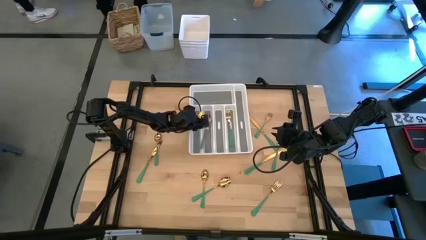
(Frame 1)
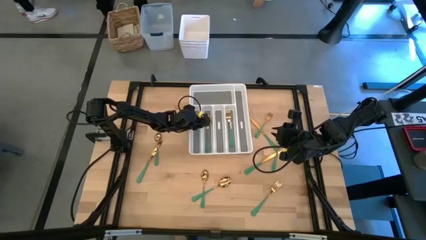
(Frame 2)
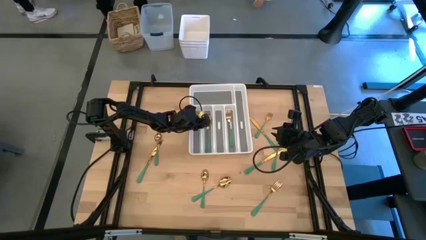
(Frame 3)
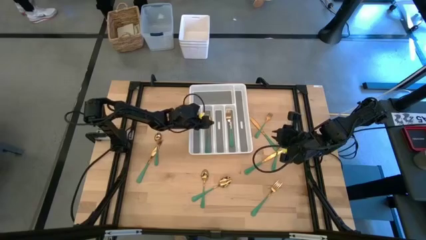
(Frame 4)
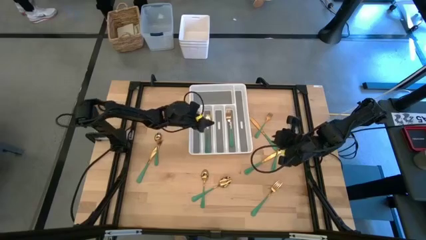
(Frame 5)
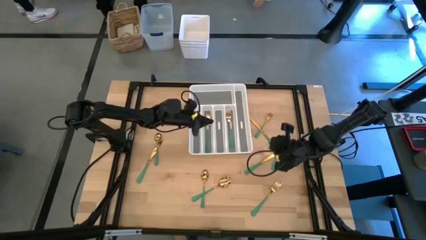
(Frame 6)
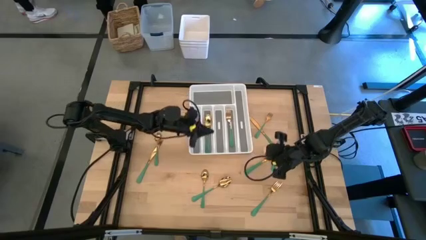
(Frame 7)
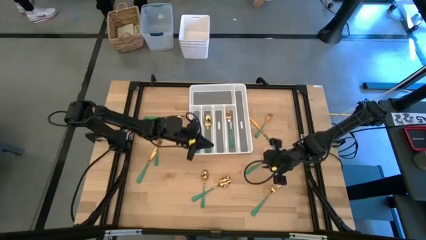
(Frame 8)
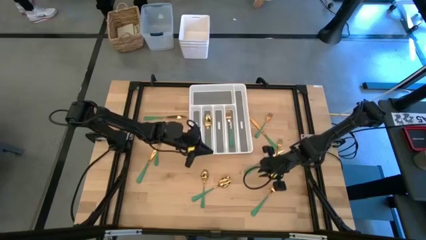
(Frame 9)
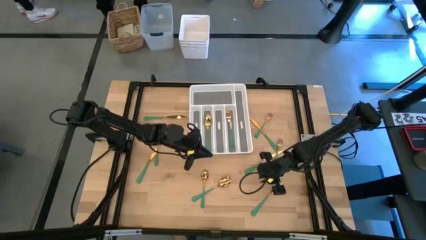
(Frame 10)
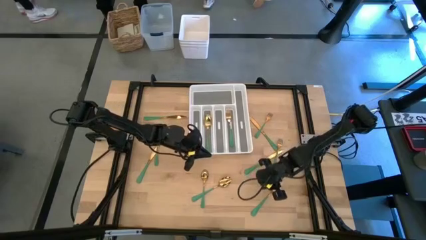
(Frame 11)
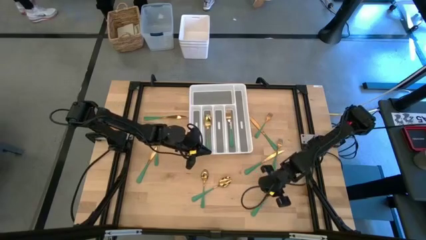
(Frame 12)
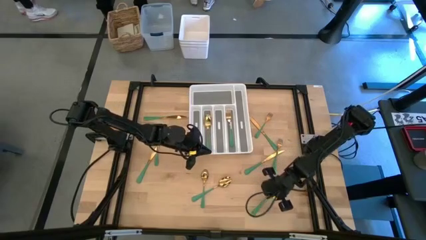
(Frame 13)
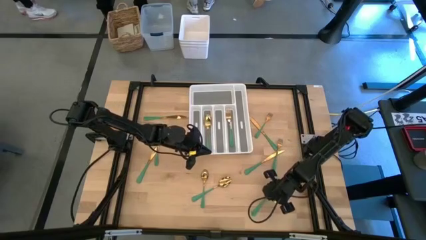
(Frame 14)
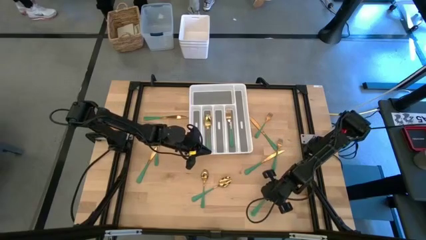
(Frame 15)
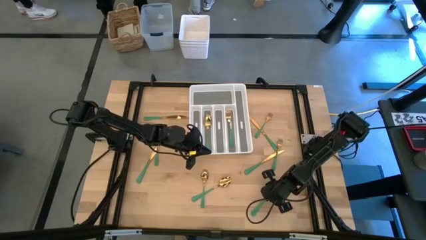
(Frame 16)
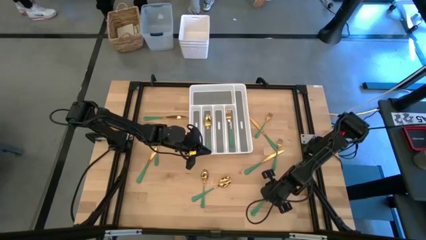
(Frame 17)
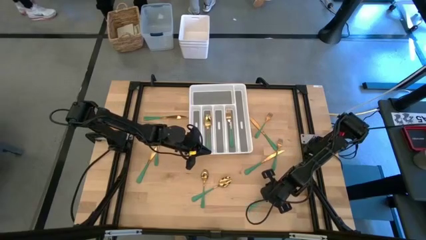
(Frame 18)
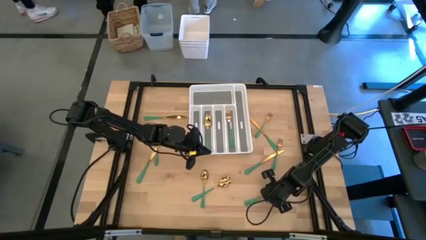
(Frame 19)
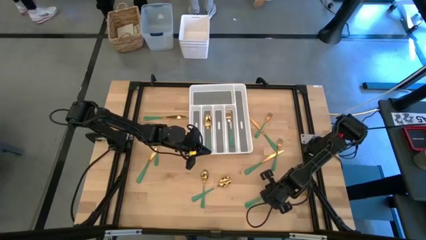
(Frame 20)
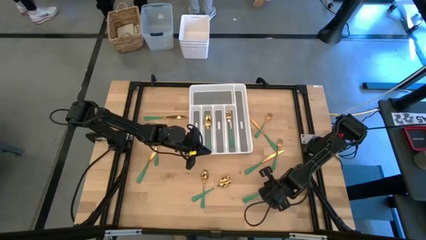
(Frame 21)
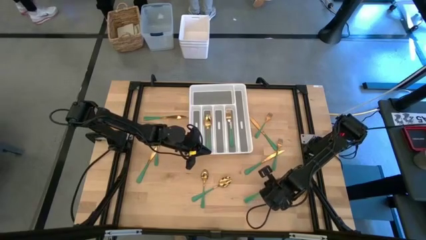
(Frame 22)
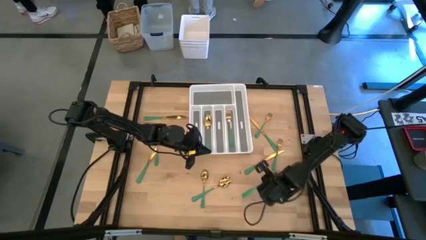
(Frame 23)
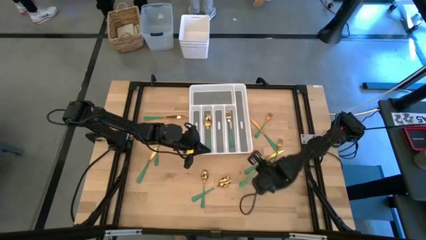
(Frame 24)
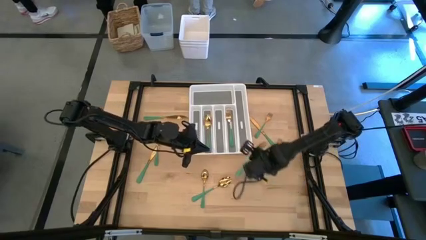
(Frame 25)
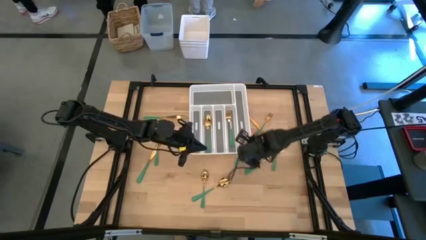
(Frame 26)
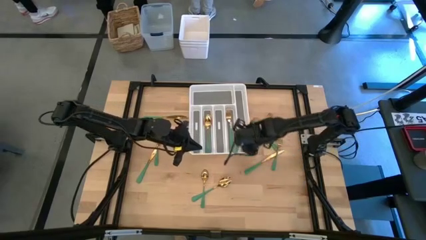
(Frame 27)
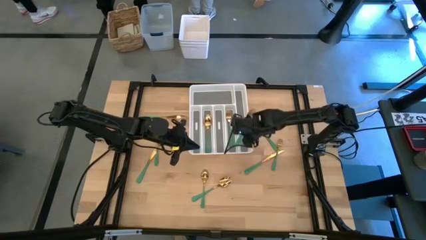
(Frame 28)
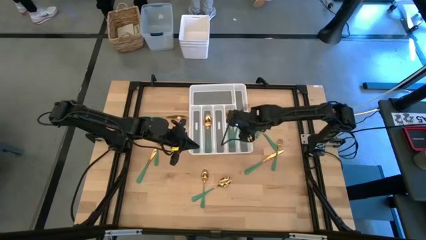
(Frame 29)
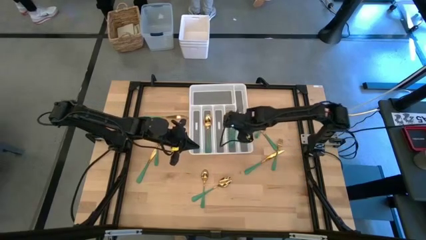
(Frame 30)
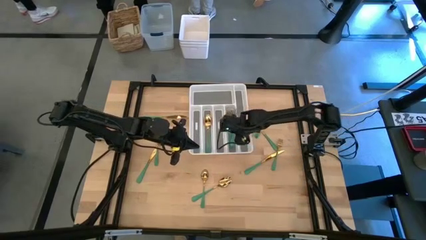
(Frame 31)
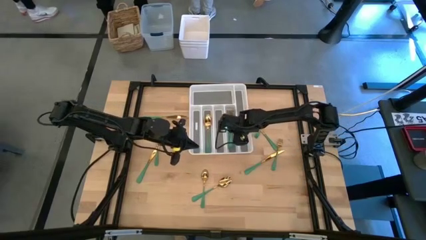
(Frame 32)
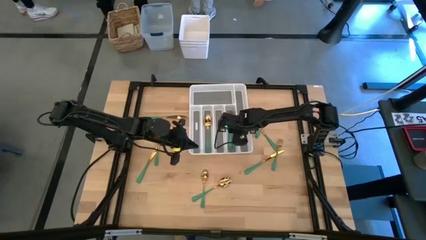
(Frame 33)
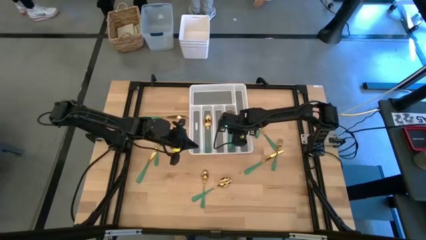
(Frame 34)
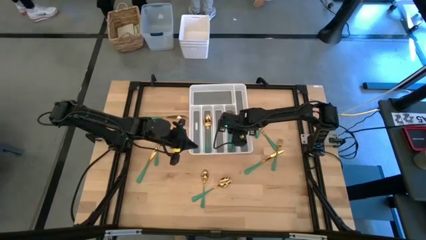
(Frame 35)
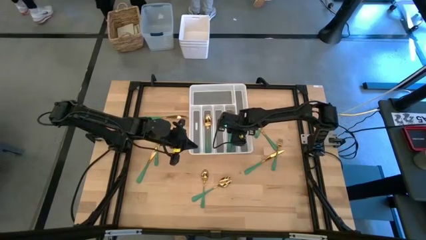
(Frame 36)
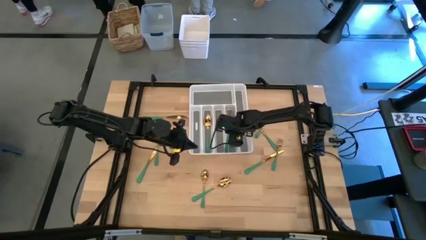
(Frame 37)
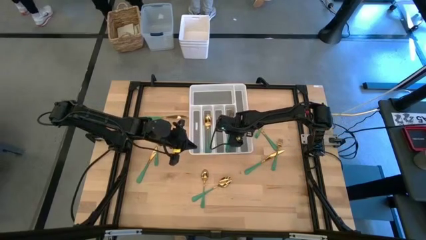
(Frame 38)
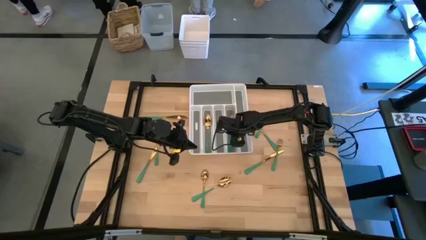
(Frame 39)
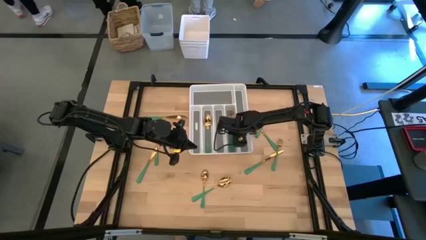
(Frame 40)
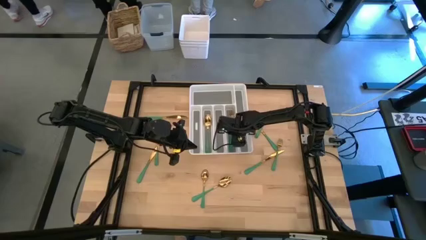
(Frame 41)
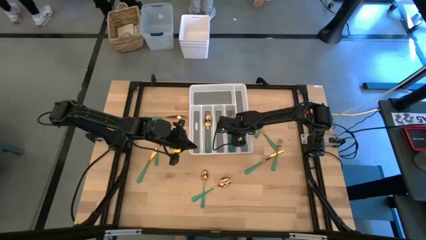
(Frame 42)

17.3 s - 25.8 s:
Task: Sort silverware
Put the bottom right fork into the silverware organizer

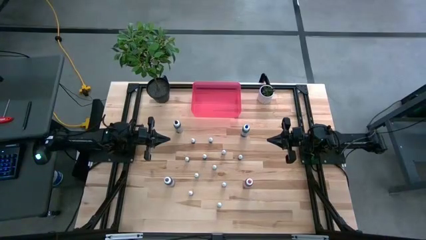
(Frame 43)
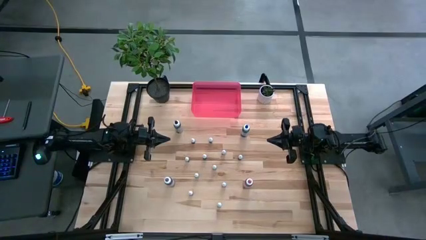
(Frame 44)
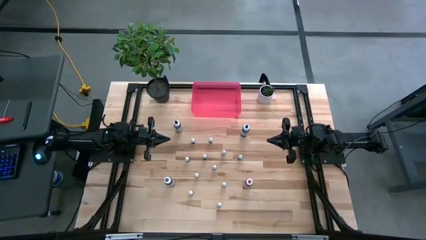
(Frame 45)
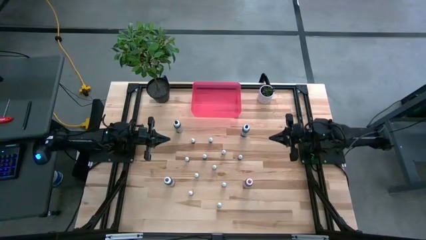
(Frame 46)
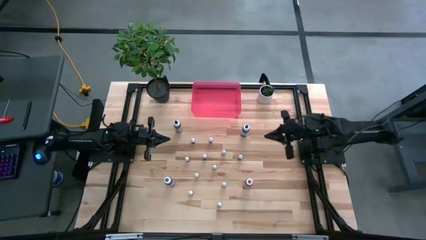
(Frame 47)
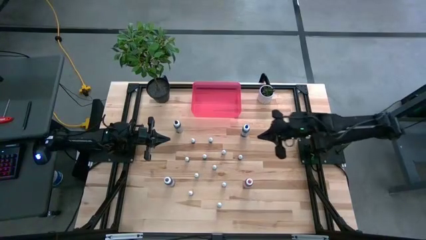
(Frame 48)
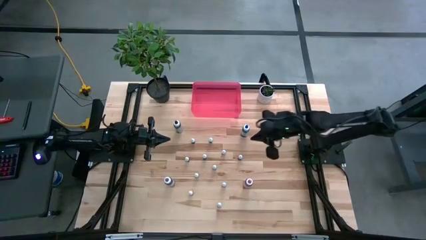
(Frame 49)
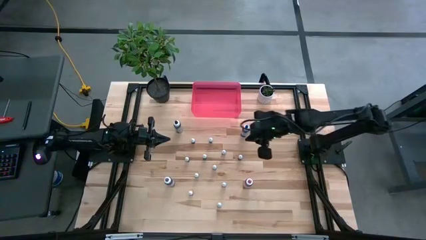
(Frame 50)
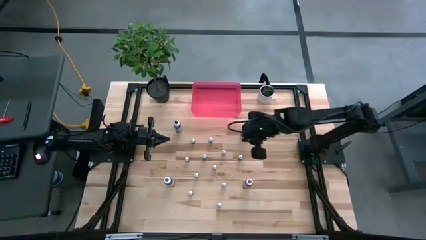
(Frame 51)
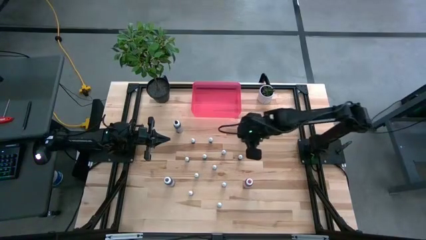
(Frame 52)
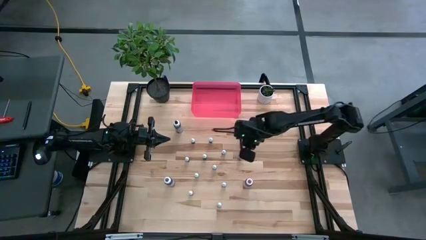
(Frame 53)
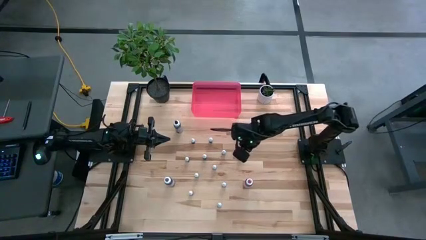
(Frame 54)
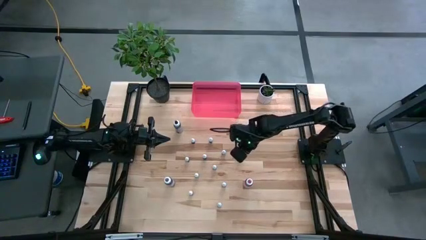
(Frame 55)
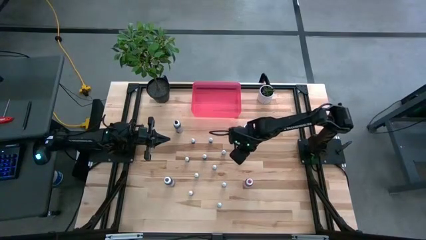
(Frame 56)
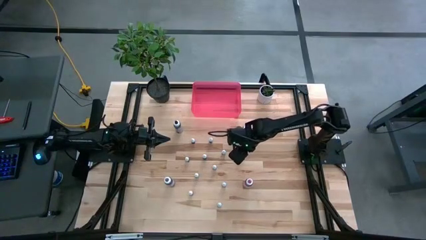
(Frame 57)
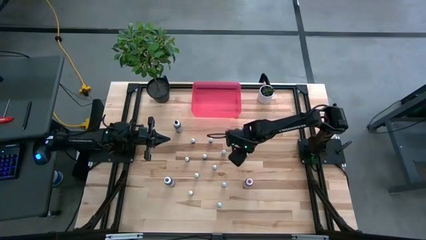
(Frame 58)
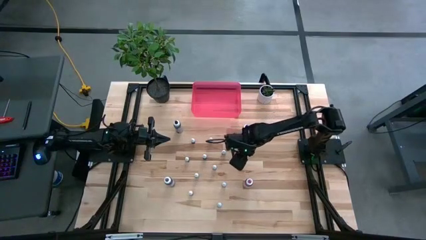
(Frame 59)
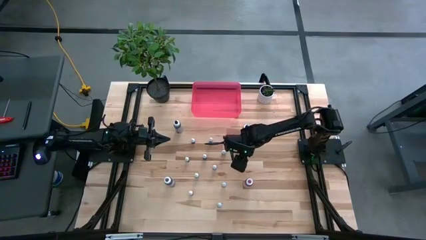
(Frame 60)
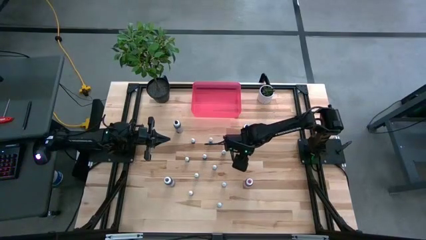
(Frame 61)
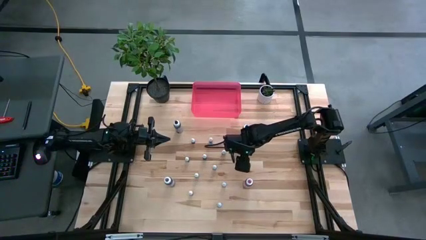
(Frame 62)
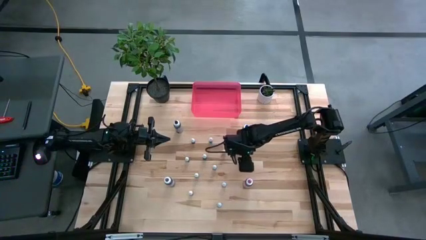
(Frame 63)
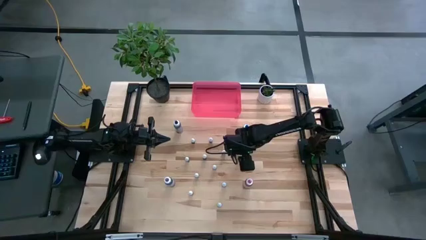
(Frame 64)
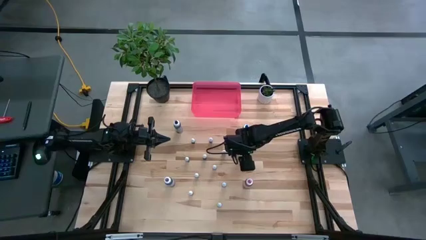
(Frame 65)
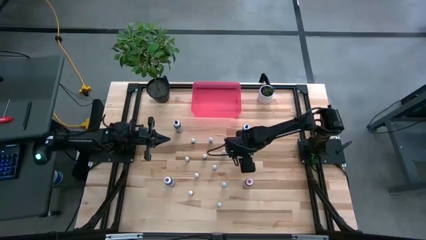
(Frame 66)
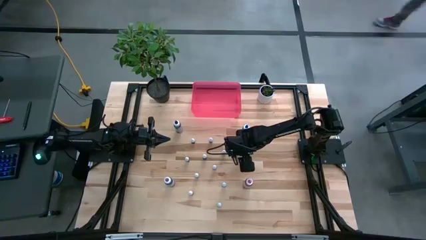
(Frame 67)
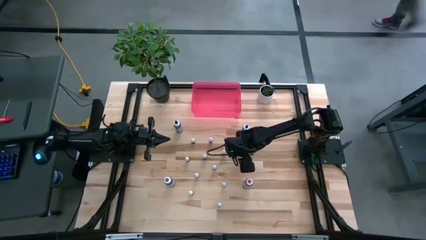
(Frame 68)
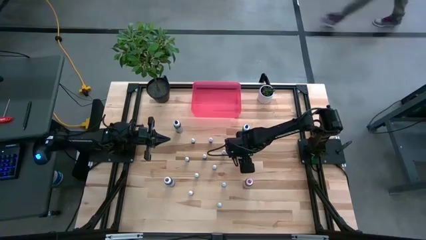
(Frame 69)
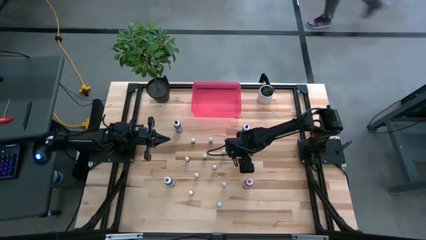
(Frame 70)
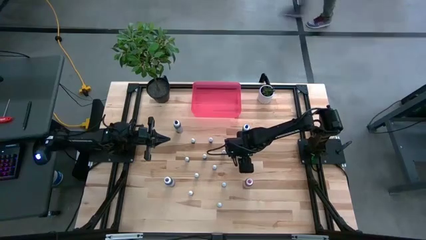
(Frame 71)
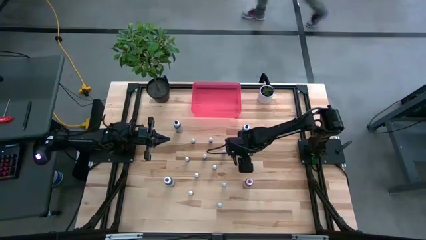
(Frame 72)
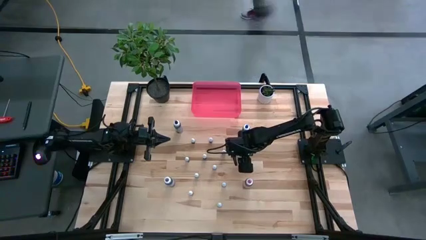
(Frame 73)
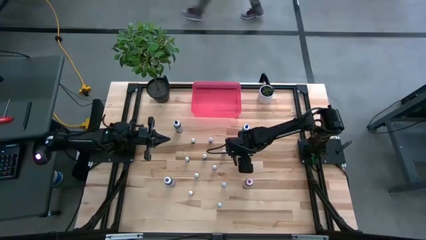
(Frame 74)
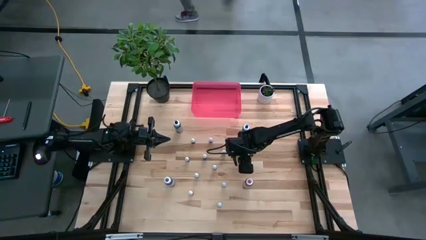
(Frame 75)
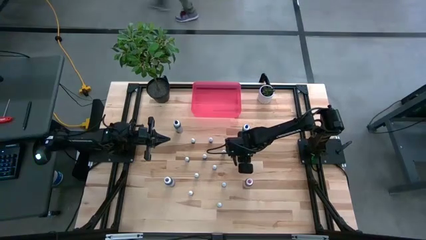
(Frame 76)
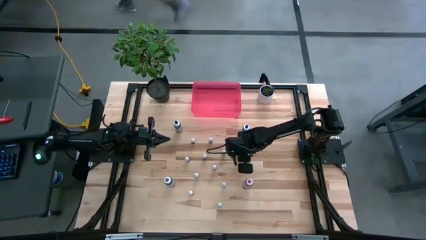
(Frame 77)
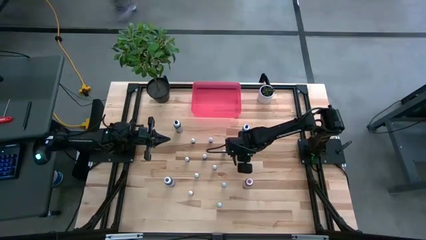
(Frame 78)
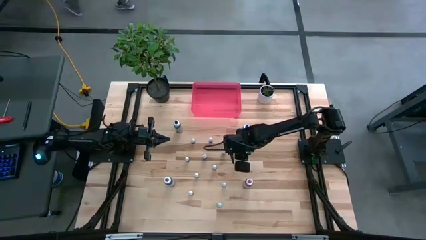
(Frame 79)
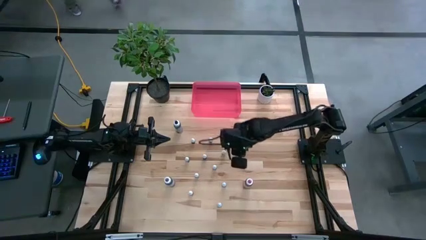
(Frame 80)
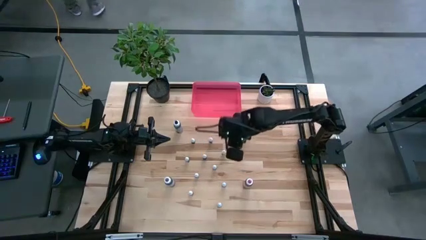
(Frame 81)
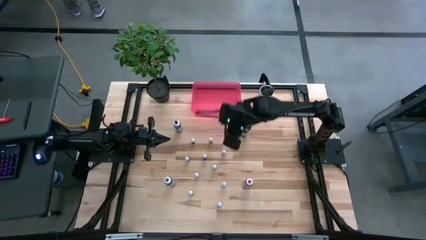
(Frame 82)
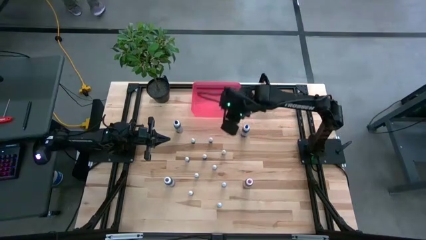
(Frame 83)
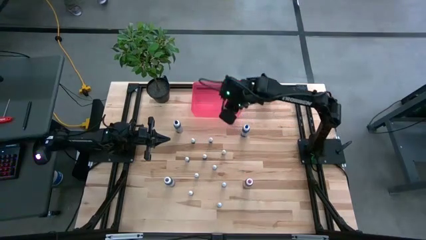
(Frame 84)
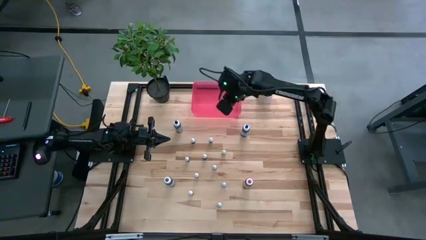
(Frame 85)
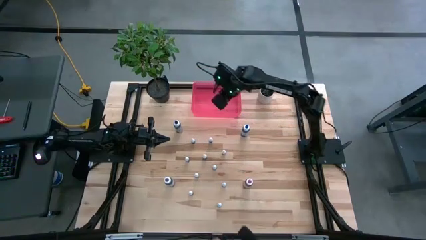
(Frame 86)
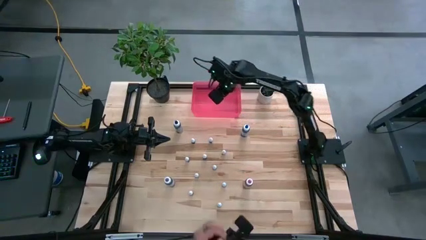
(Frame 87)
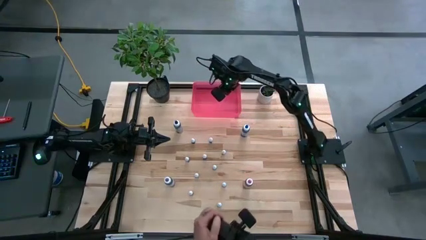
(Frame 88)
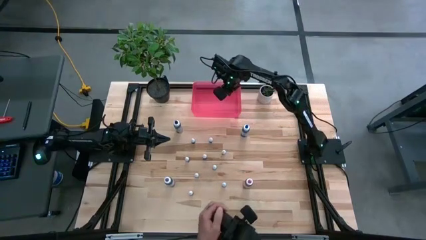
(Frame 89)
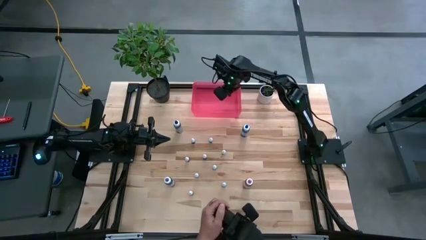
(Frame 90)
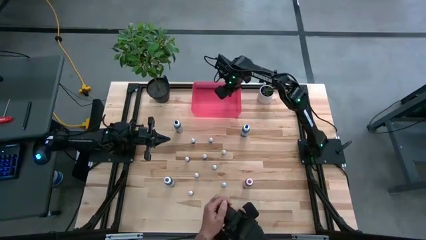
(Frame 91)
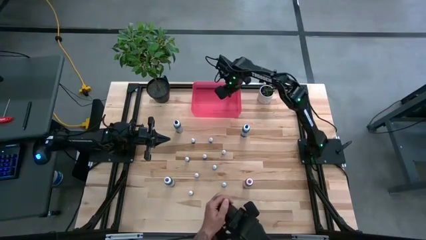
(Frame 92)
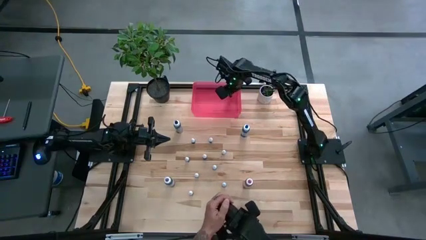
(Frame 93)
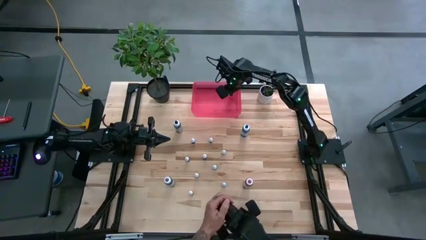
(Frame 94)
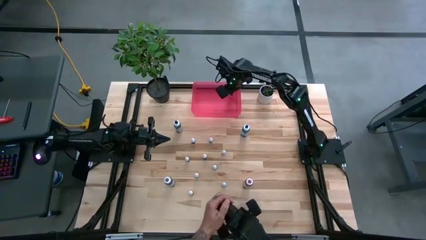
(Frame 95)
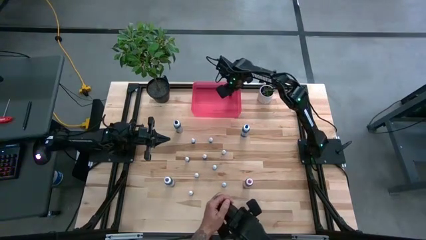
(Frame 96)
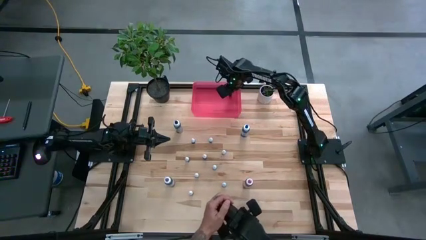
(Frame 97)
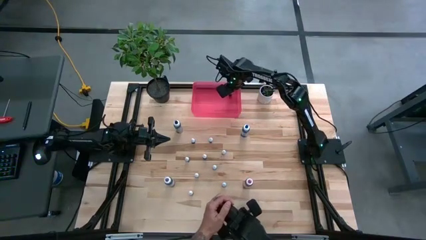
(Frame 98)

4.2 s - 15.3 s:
Task: Pick & Place food coloring
Put the small black food coloring bottle into the red bin
